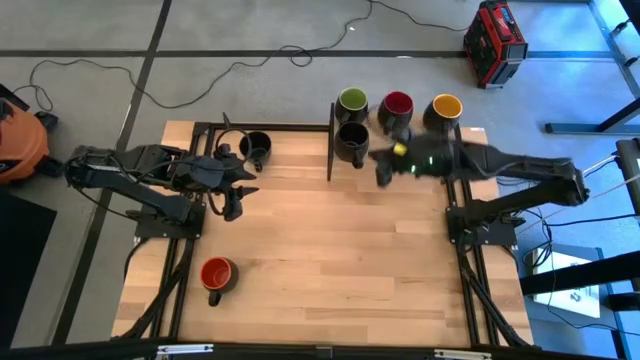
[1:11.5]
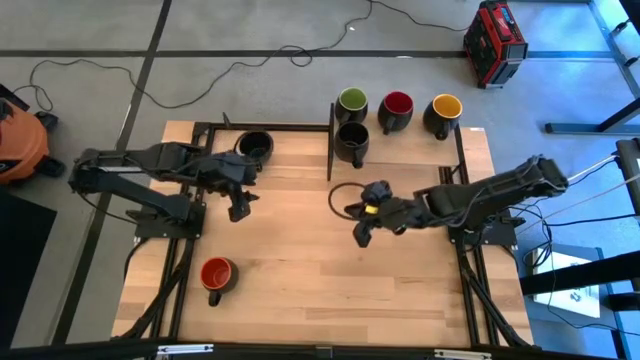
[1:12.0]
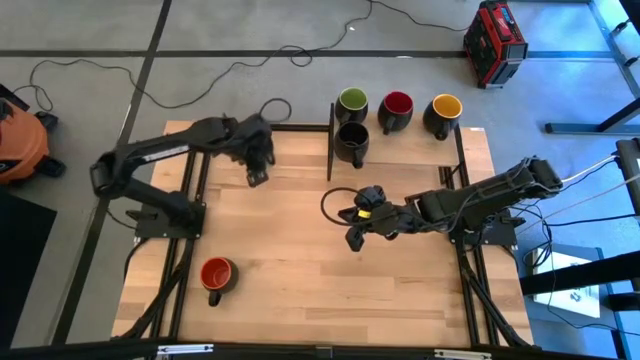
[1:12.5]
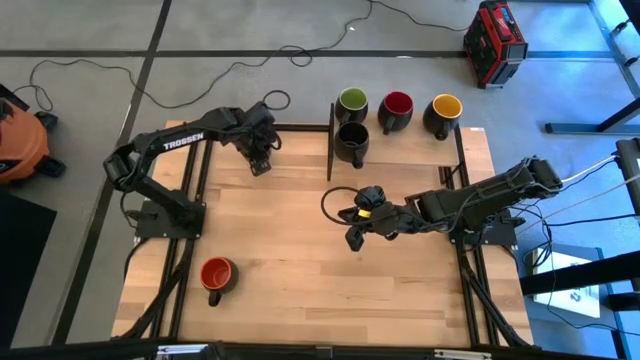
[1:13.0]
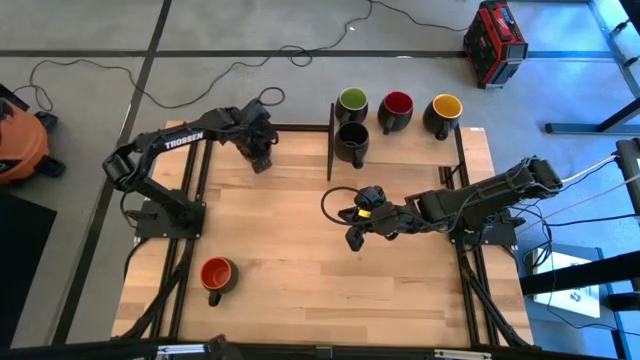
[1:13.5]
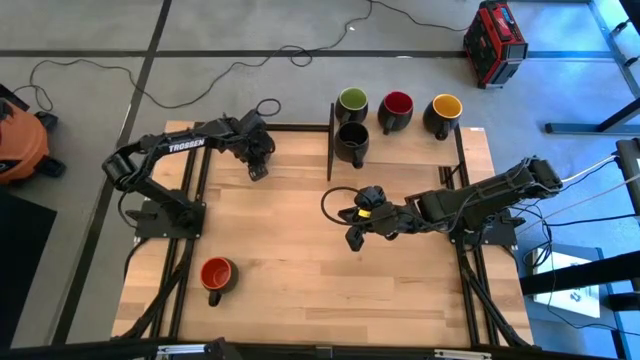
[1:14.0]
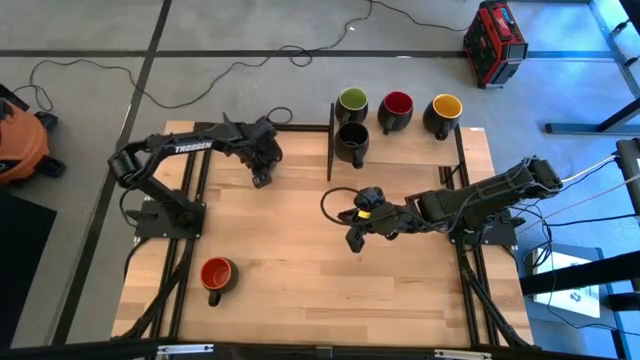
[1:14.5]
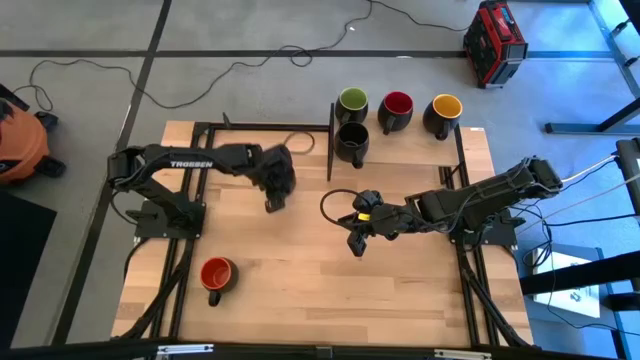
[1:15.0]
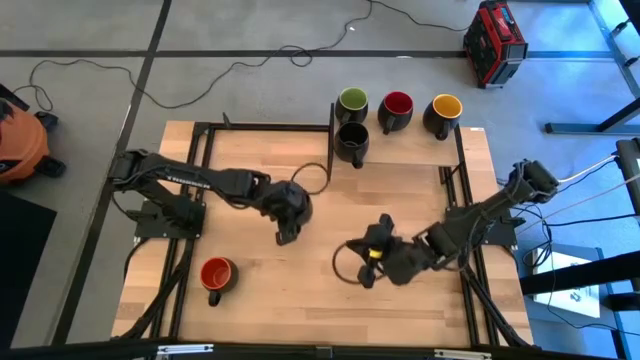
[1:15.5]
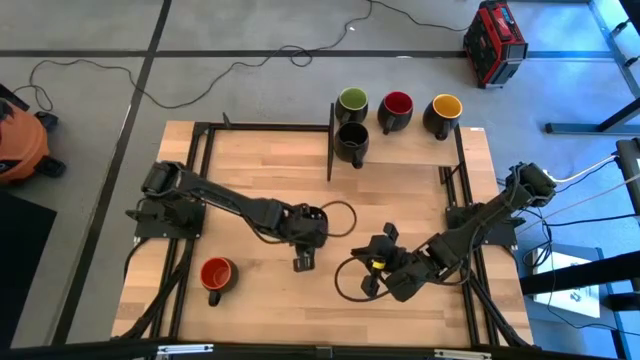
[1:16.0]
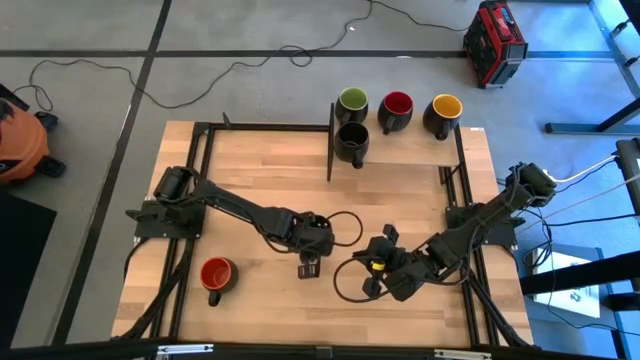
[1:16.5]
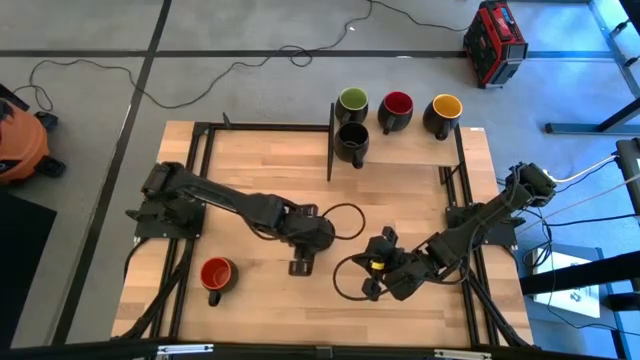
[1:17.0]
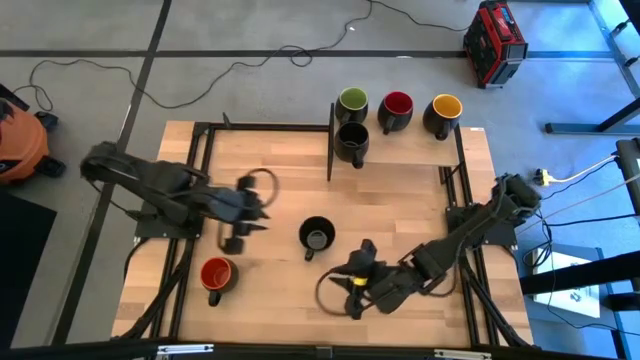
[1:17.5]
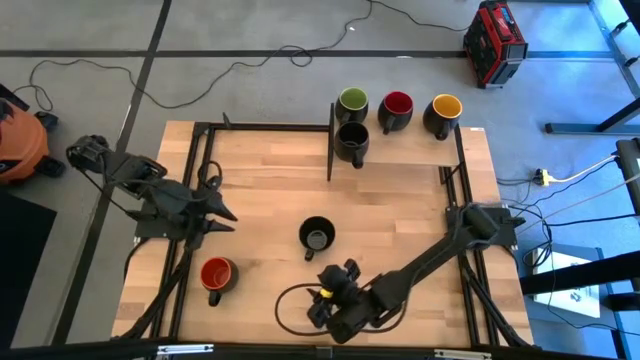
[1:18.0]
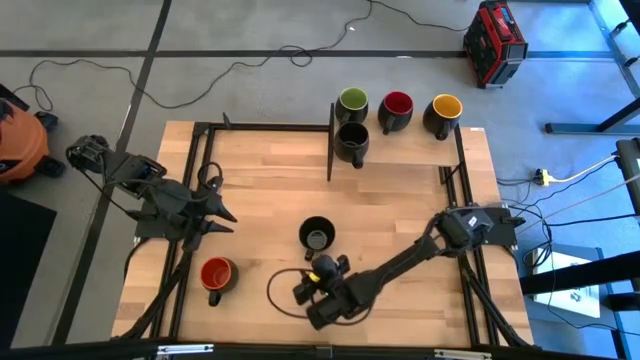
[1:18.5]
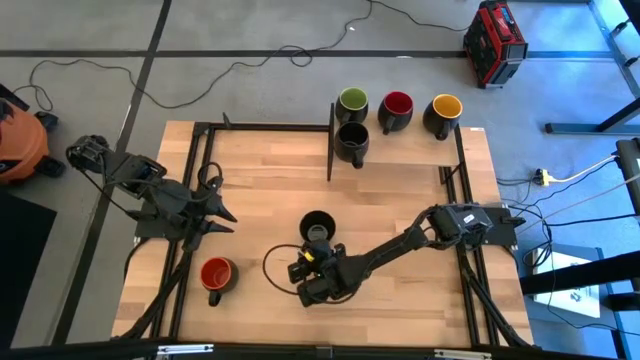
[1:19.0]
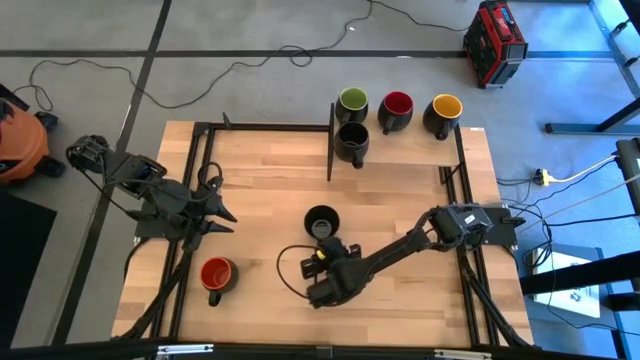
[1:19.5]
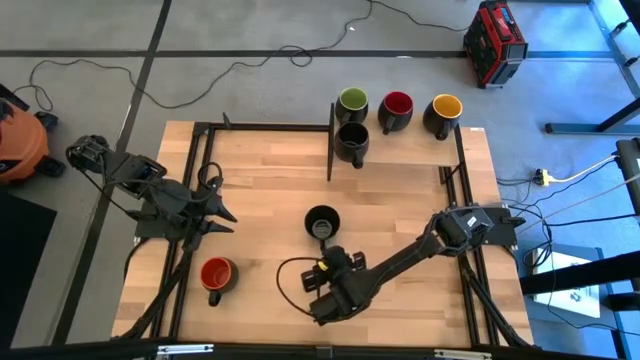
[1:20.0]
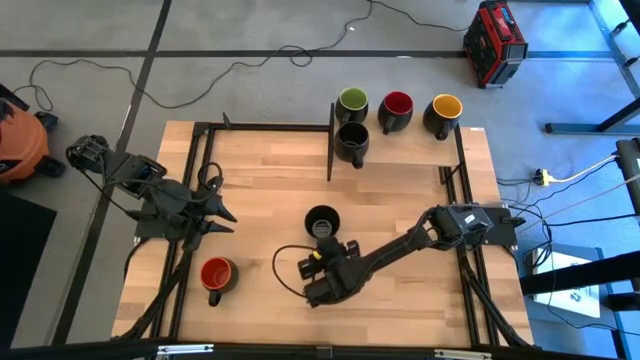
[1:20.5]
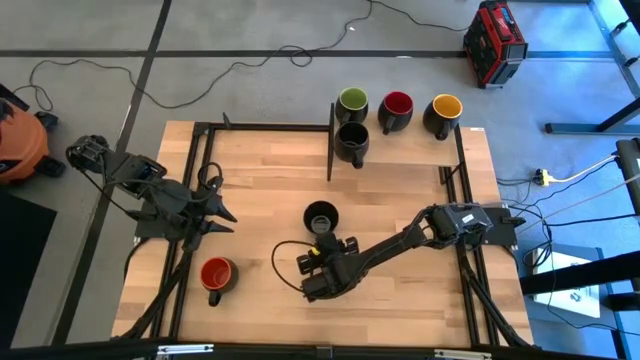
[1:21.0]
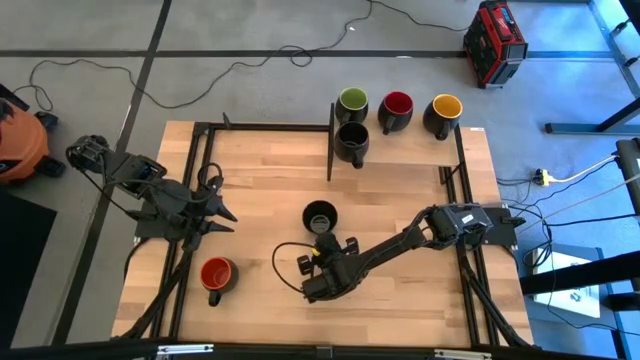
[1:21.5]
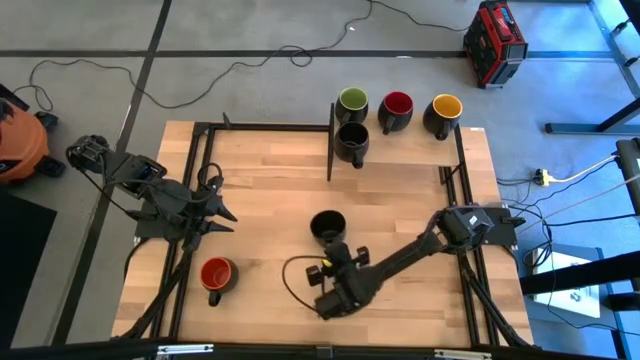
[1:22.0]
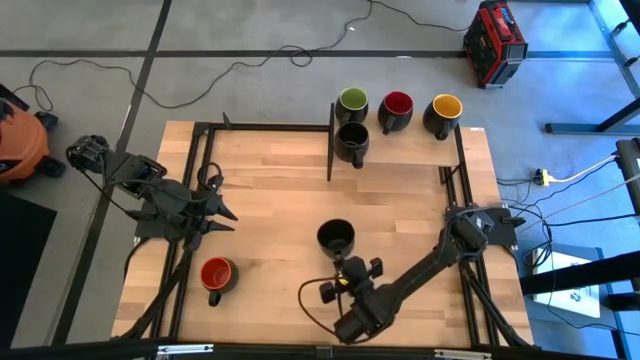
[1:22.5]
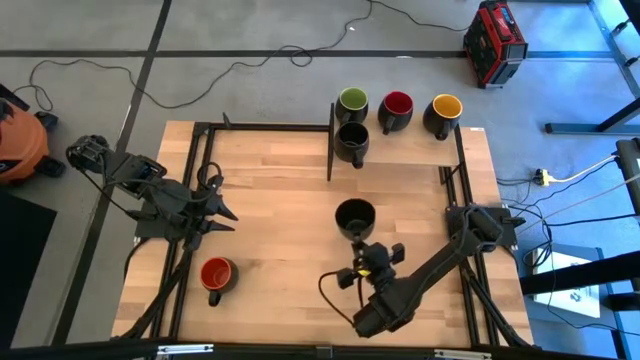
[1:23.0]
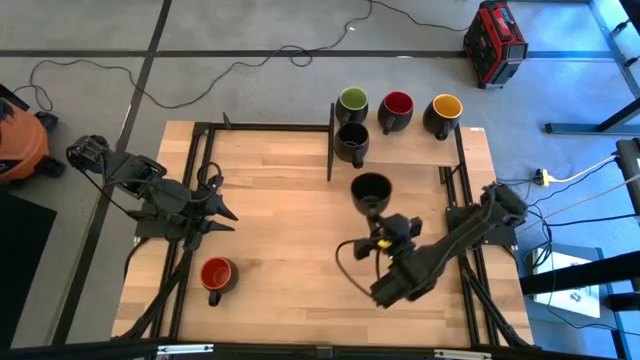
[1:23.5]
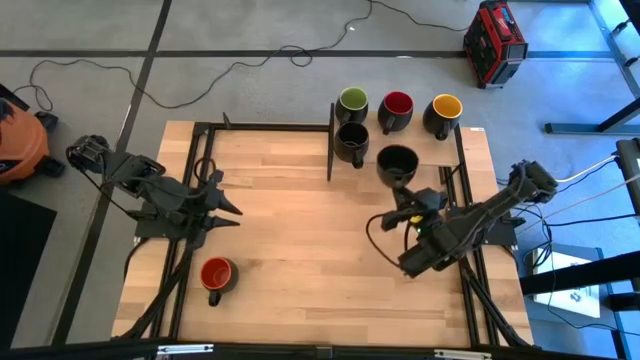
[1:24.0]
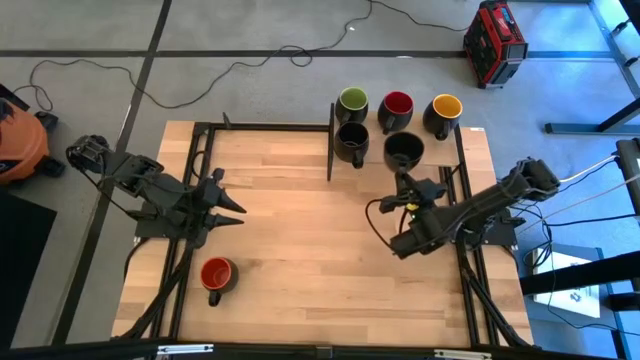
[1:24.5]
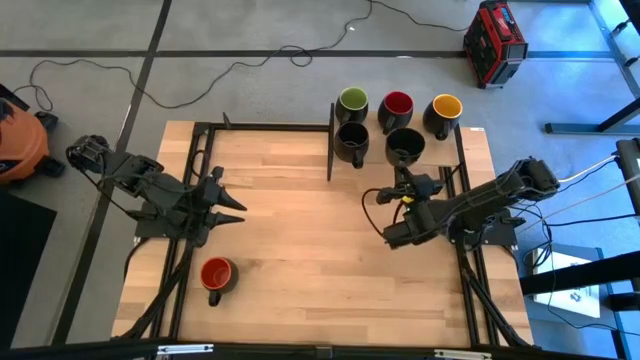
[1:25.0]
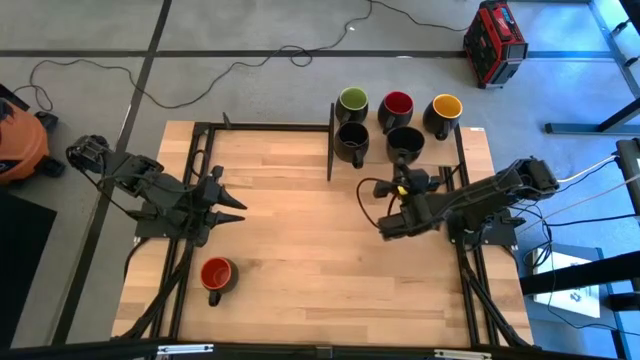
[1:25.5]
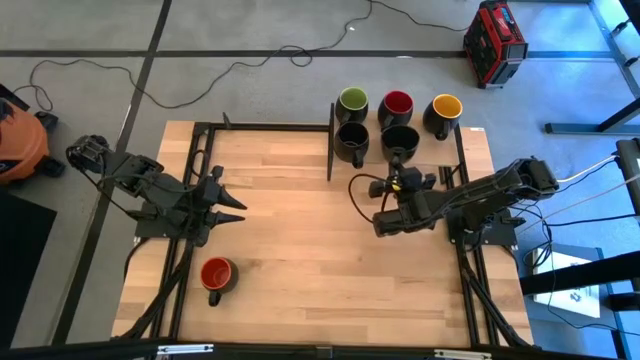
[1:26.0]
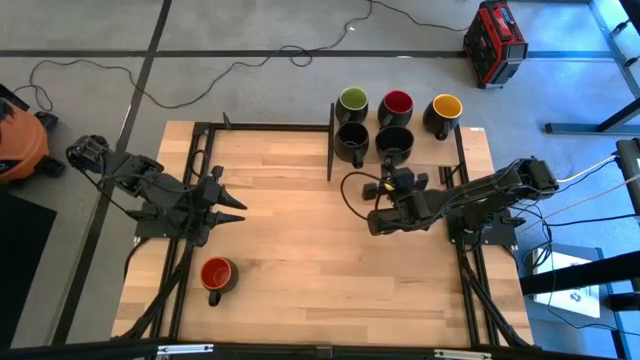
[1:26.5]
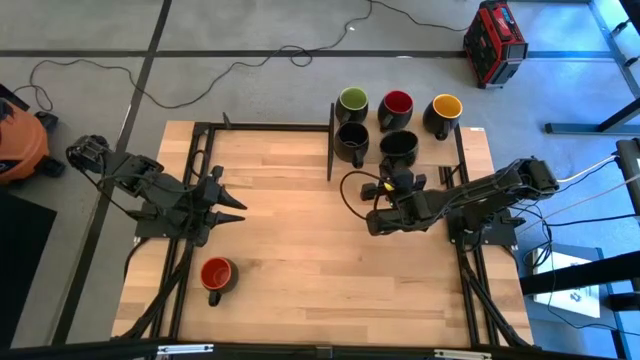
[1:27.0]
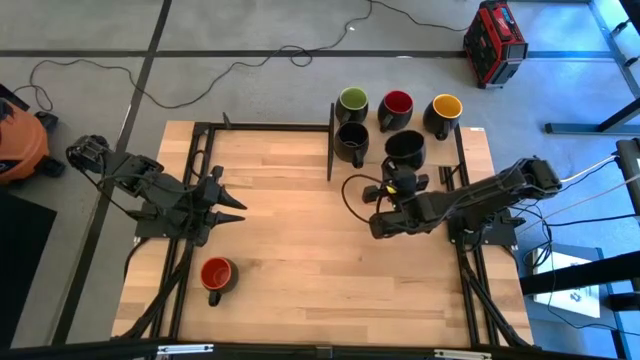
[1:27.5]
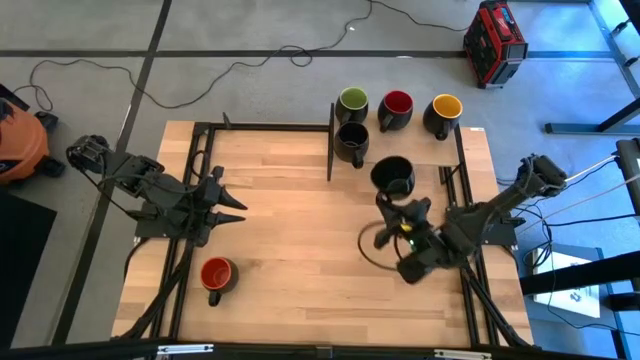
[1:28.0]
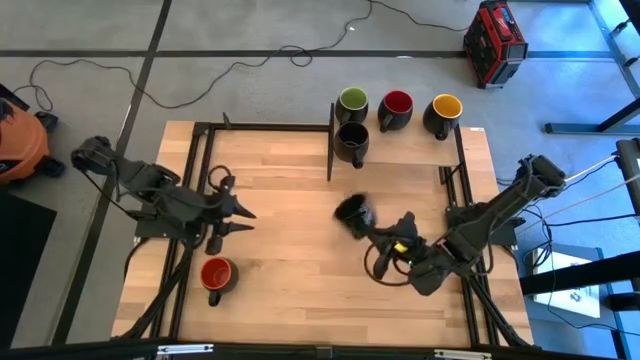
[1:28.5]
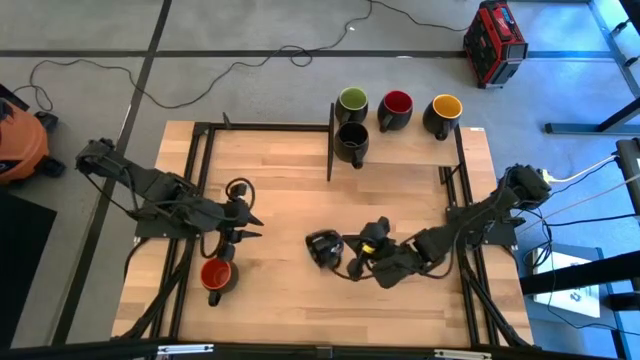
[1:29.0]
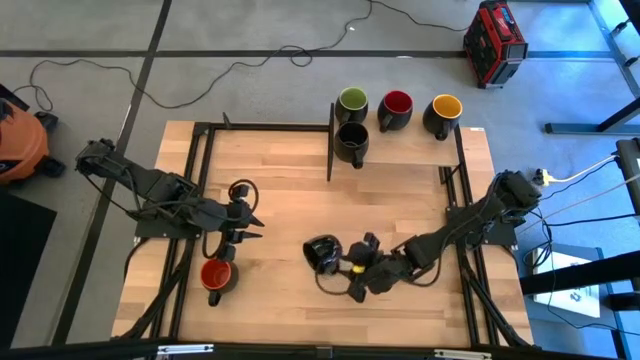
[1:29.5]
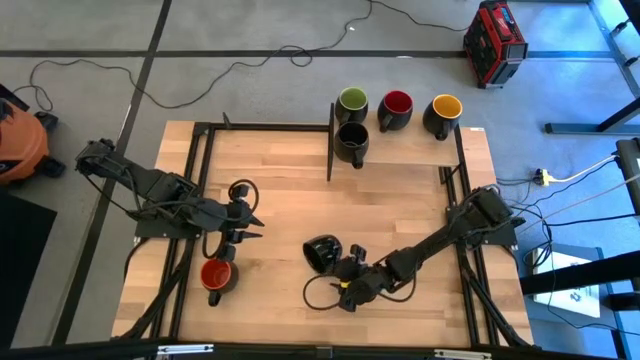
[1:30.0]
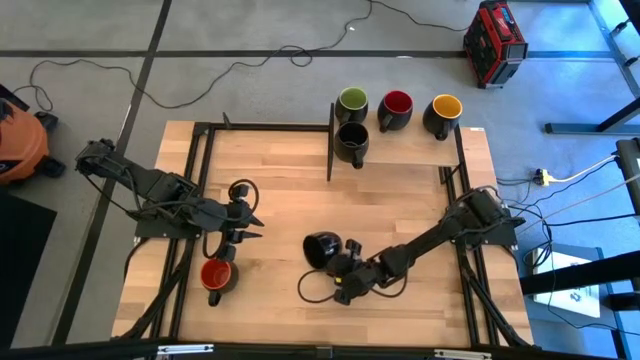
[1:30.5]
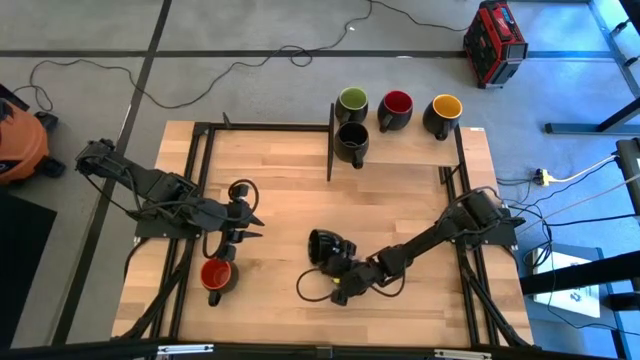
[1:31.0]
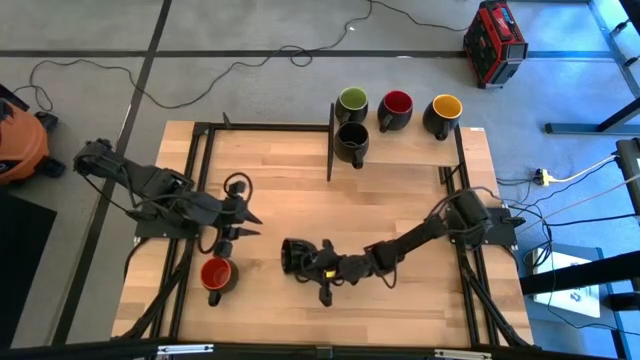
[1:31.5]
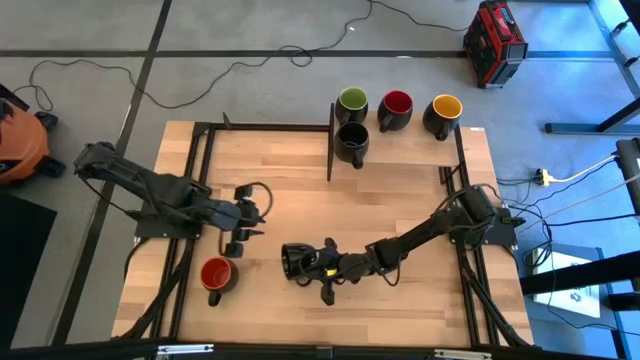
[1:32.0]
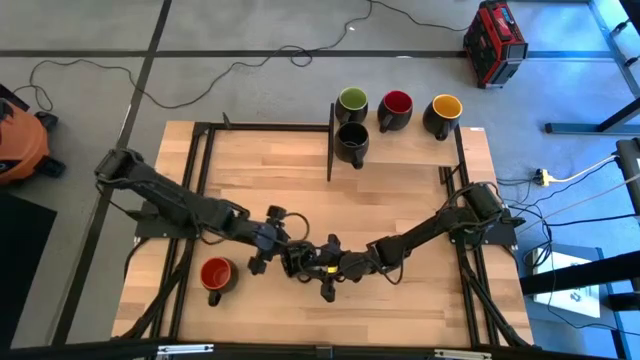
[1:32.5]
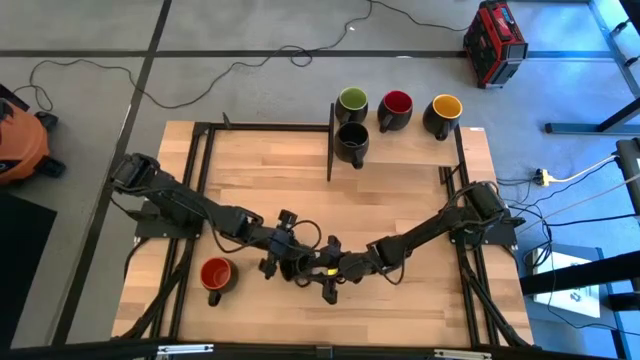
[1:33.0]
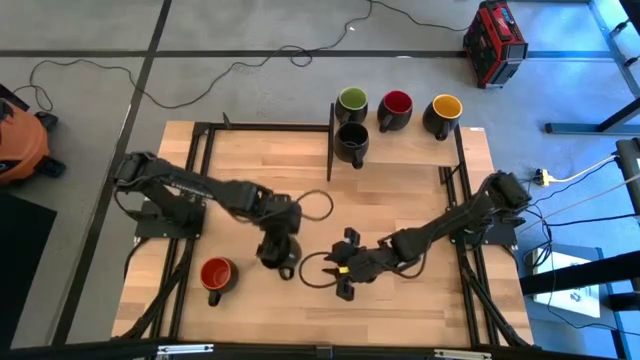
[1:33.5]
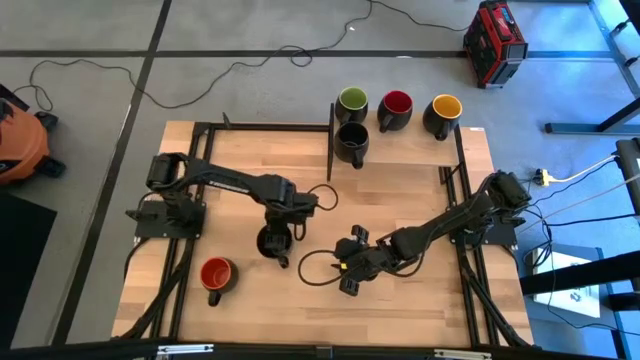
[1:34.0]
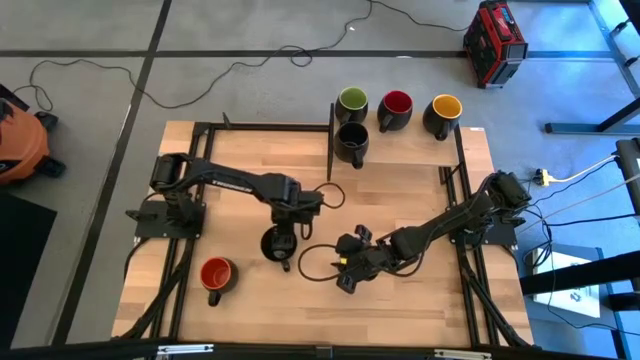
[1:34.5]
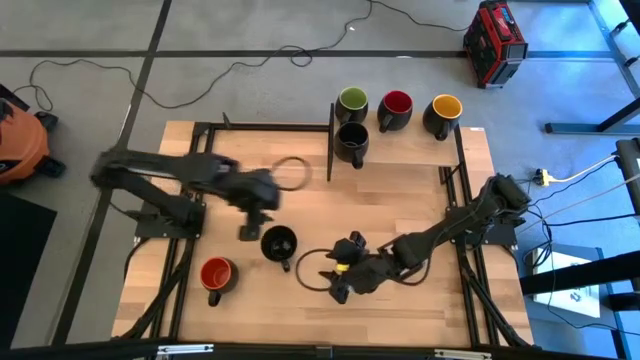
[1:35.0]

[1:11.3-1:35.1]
Task: Place coffee mugs
Put the black mug on the shelf
